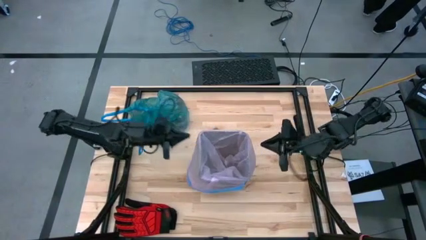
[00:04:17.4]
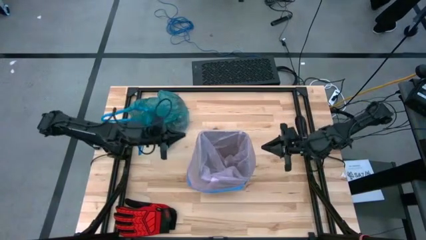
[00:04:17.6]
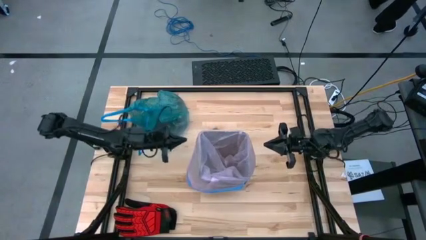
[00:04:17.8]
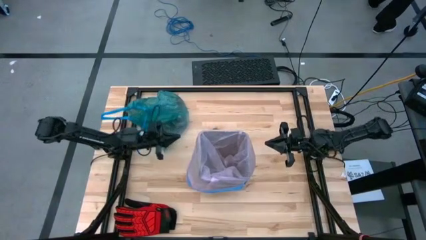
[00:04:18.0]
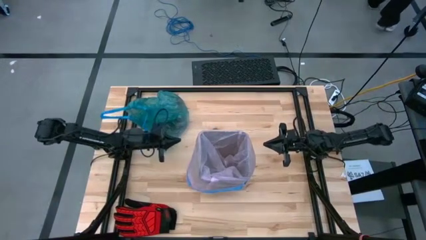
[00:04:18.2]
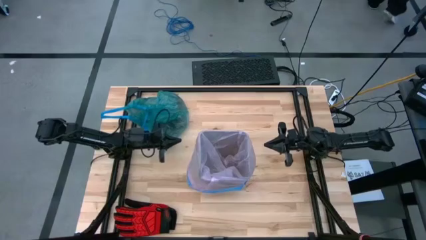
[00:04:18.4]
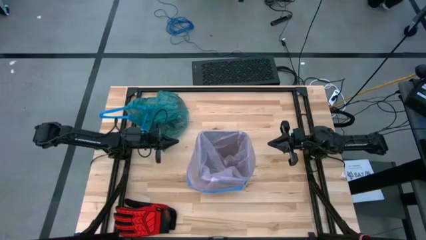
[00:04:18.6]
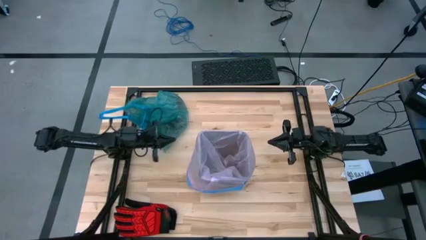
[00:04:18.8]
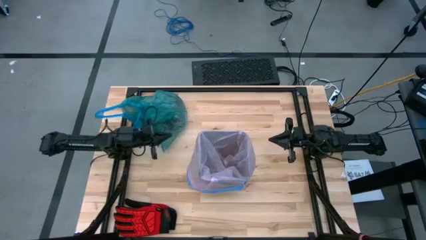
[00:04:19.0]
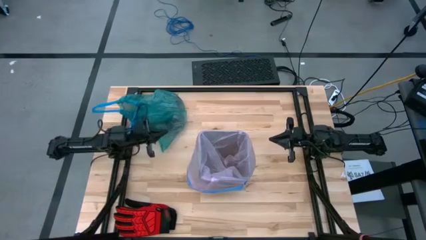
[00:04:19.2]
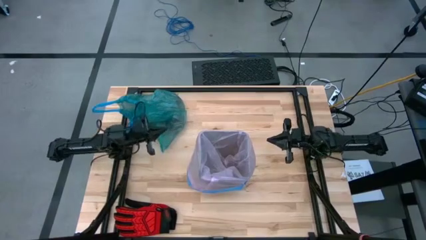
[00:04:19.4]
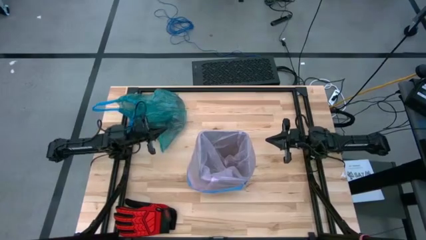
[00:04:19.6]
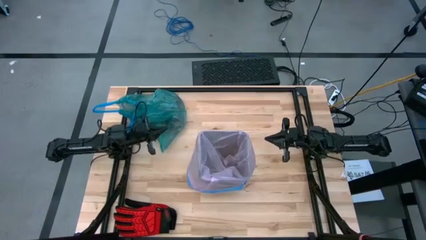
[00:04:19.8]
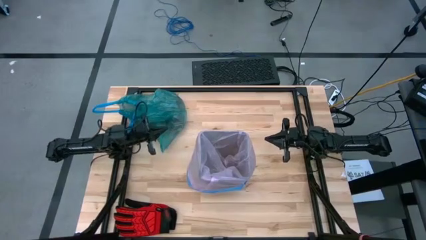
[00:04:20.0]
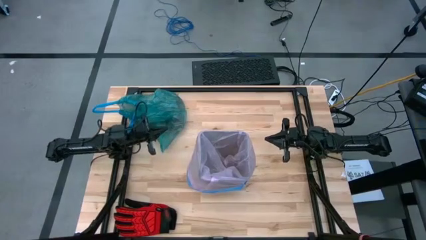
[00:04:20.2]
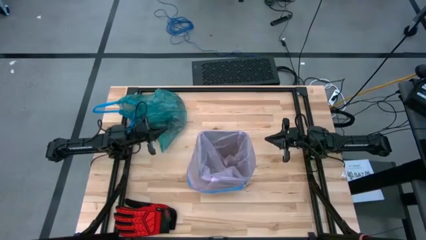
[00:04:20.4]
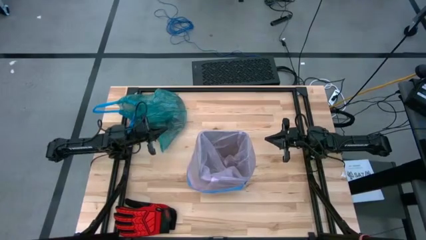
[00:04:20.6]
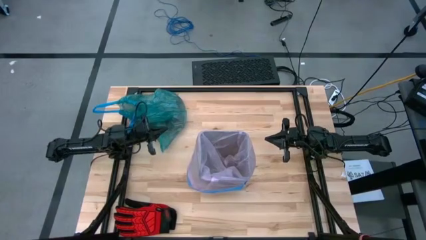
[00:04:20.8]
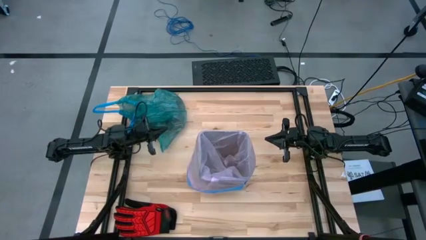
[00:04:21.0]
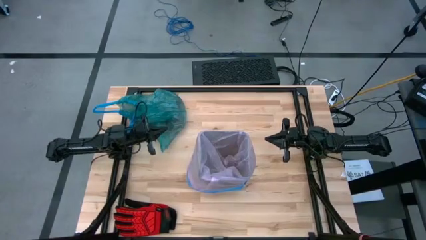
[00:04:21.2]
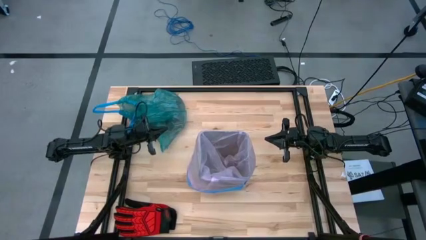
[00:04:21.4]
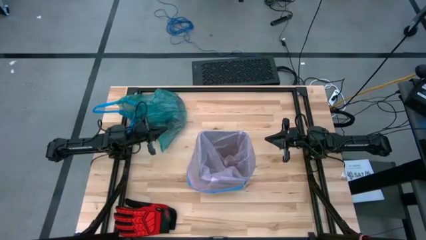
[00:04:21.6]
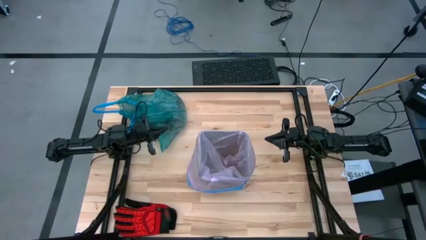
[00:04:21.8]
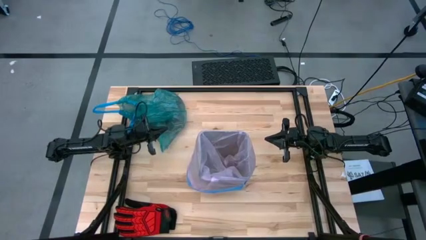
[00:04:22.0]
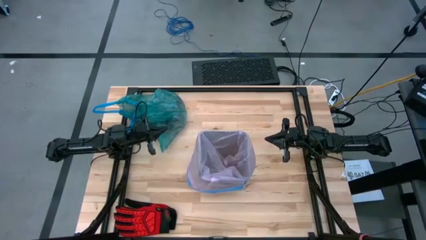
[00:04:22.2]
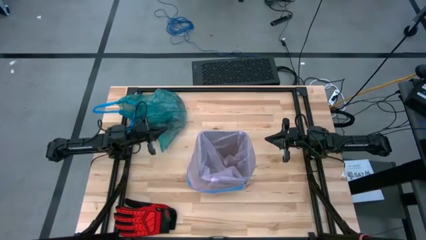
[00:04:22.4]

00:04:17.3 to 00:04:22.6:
Task: place trash/remove bag and relplace
Return to Home Position

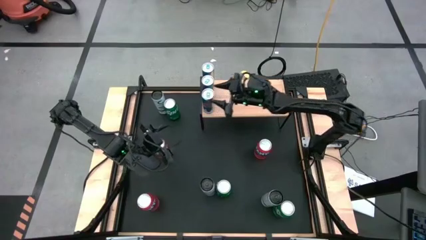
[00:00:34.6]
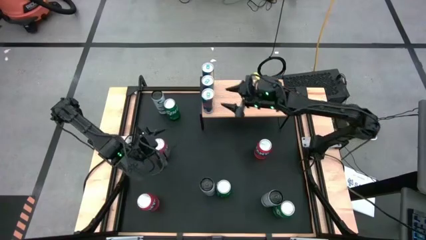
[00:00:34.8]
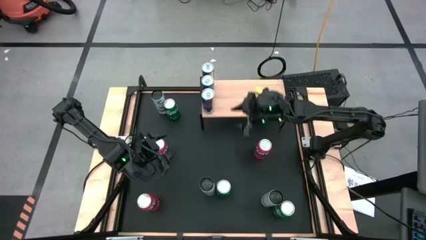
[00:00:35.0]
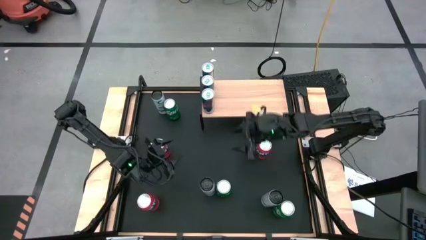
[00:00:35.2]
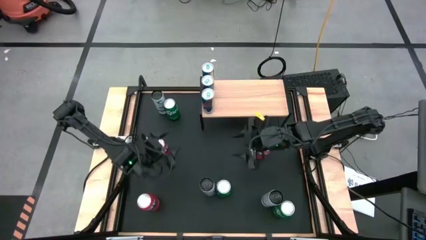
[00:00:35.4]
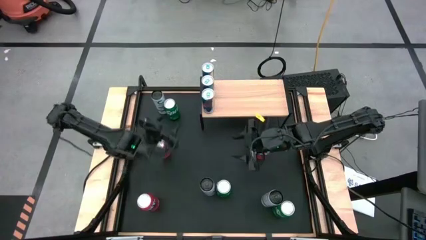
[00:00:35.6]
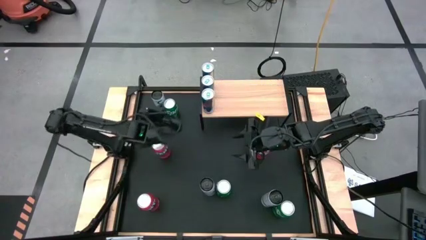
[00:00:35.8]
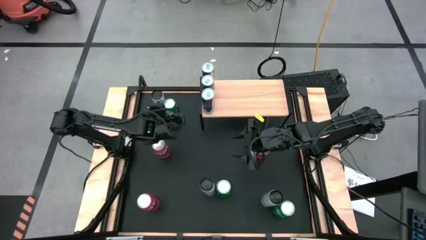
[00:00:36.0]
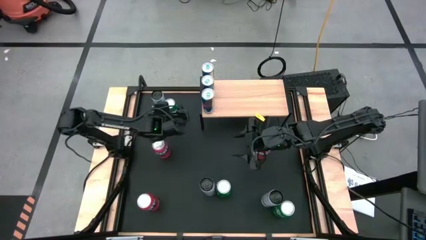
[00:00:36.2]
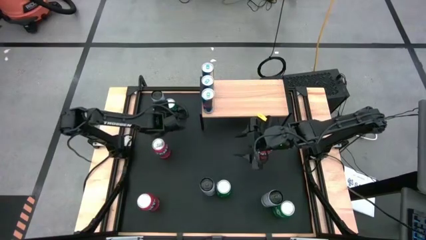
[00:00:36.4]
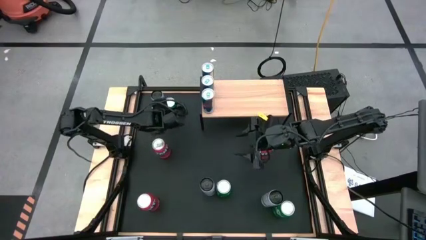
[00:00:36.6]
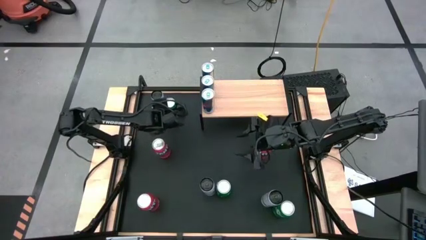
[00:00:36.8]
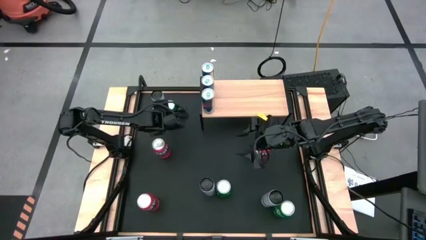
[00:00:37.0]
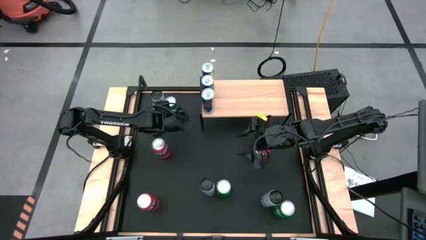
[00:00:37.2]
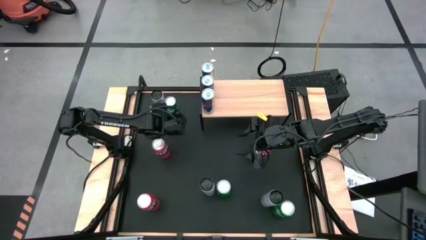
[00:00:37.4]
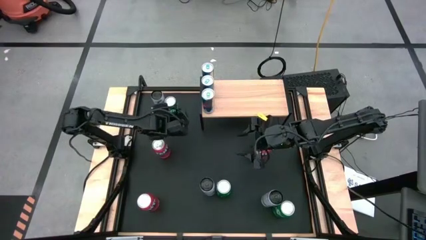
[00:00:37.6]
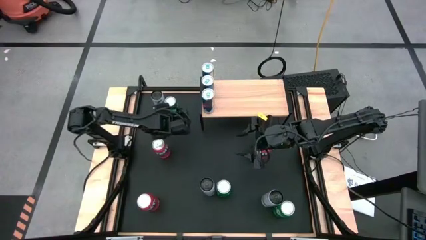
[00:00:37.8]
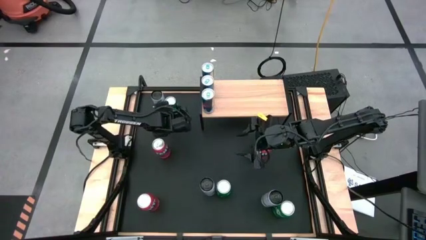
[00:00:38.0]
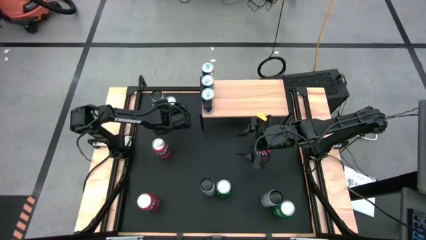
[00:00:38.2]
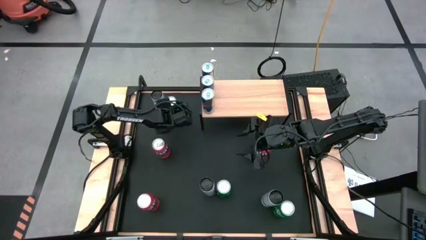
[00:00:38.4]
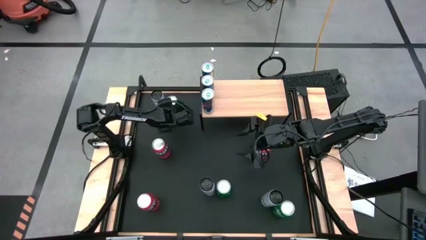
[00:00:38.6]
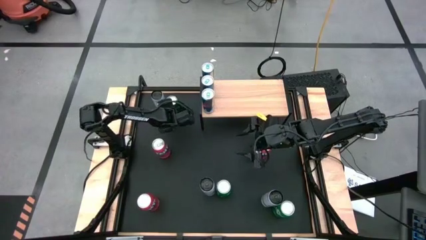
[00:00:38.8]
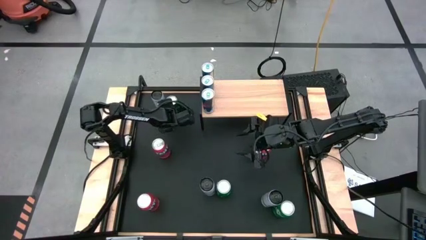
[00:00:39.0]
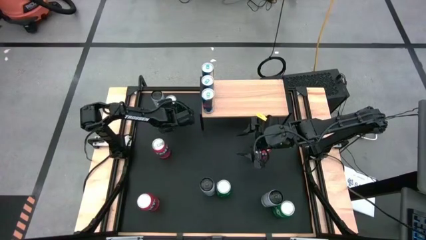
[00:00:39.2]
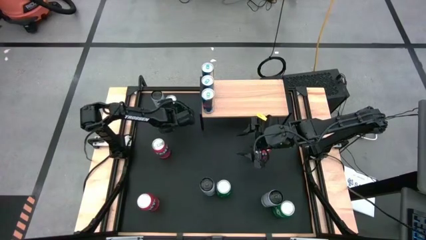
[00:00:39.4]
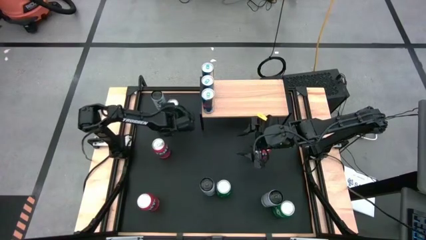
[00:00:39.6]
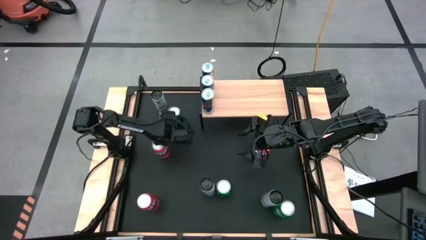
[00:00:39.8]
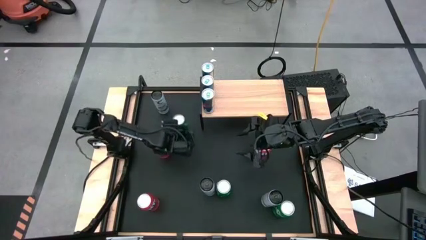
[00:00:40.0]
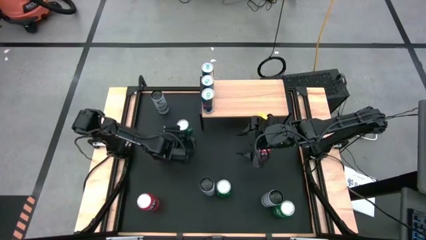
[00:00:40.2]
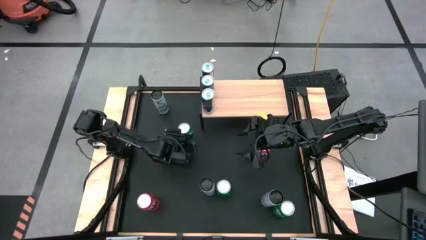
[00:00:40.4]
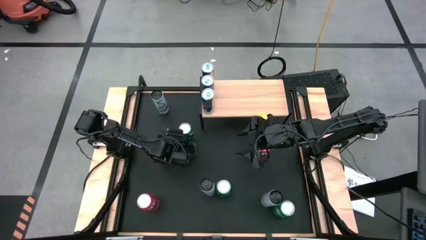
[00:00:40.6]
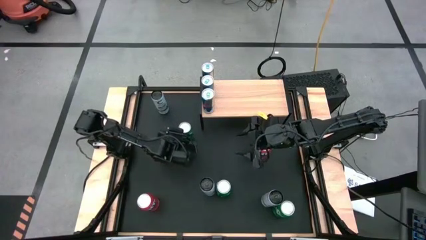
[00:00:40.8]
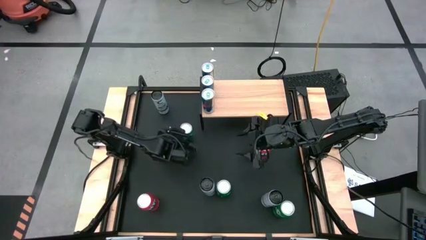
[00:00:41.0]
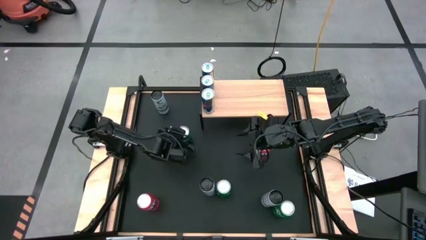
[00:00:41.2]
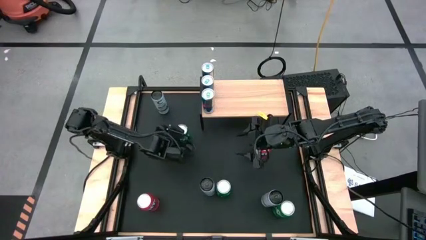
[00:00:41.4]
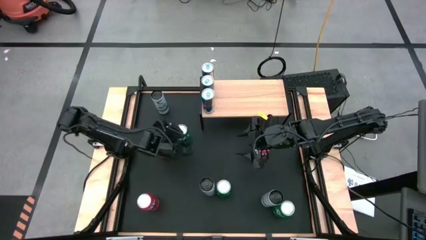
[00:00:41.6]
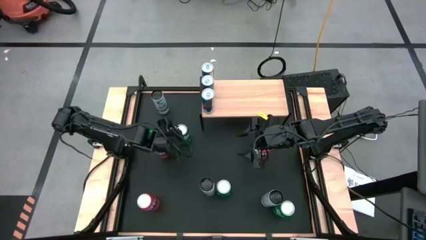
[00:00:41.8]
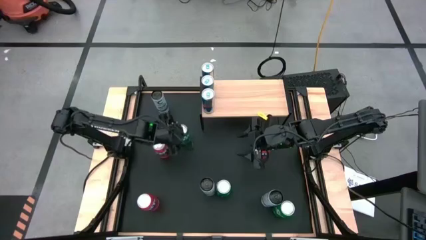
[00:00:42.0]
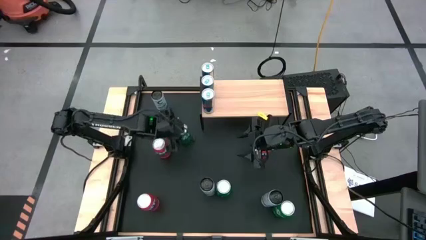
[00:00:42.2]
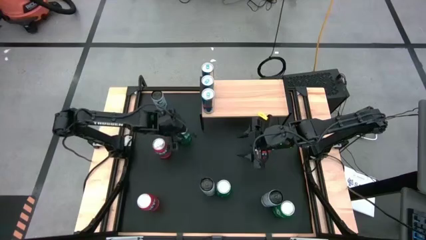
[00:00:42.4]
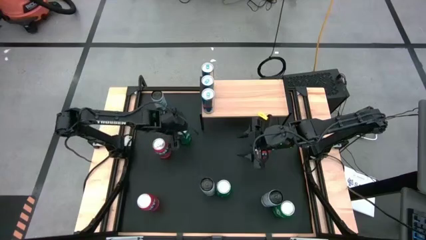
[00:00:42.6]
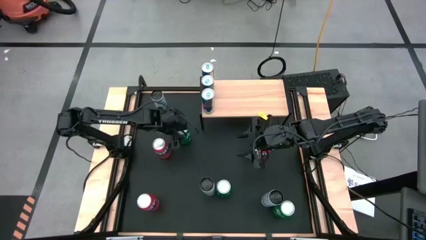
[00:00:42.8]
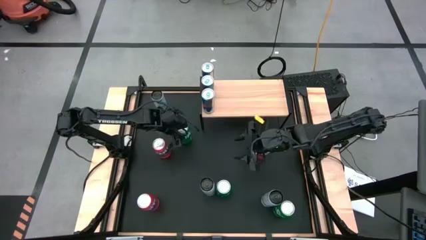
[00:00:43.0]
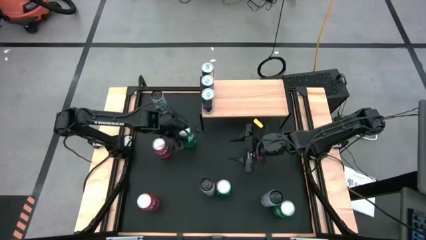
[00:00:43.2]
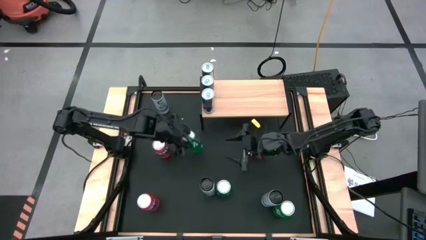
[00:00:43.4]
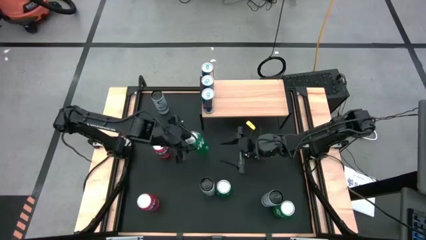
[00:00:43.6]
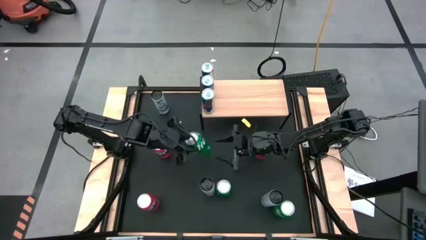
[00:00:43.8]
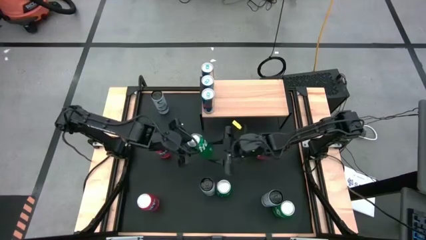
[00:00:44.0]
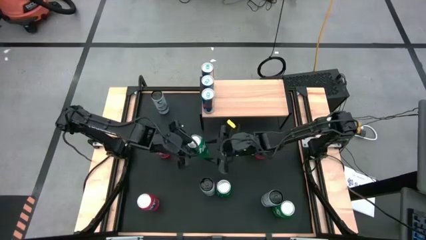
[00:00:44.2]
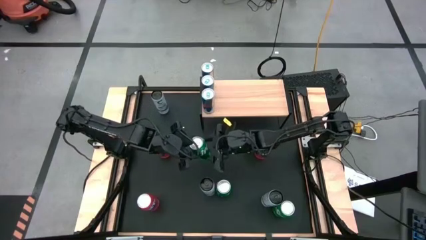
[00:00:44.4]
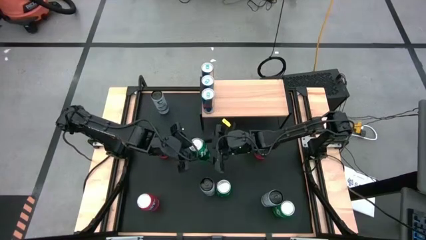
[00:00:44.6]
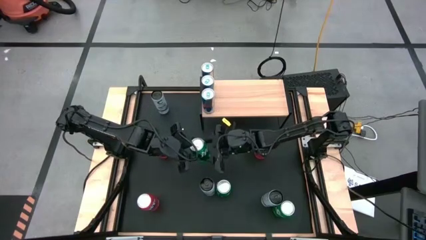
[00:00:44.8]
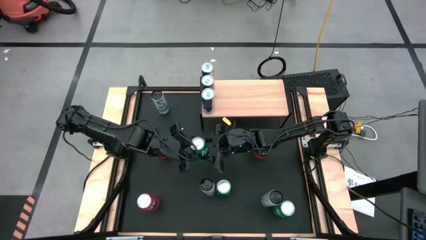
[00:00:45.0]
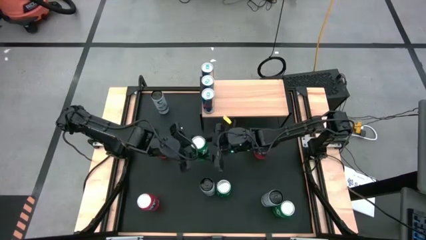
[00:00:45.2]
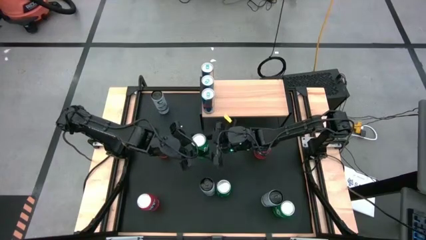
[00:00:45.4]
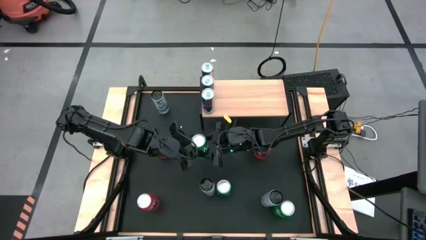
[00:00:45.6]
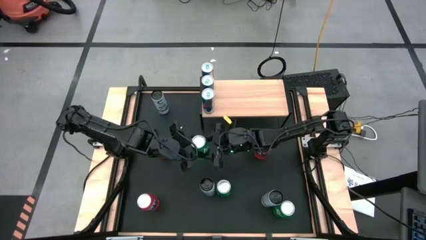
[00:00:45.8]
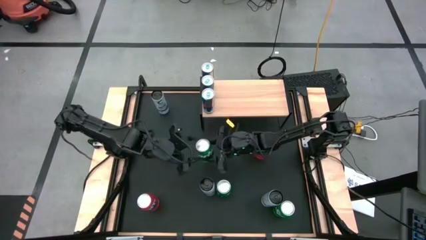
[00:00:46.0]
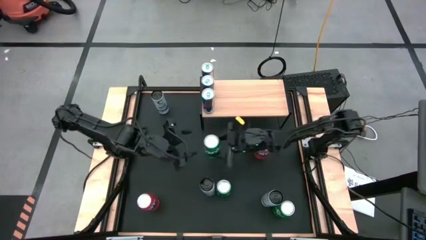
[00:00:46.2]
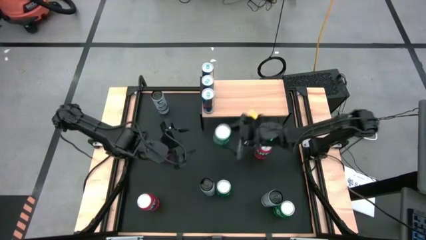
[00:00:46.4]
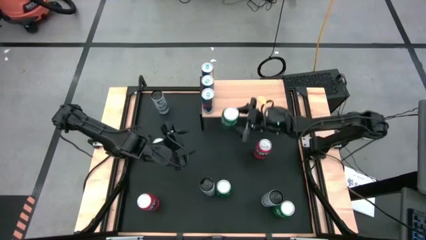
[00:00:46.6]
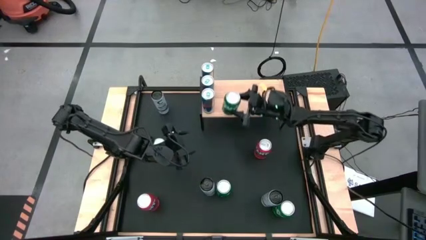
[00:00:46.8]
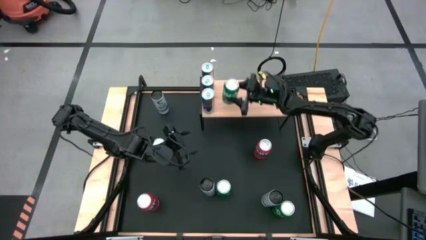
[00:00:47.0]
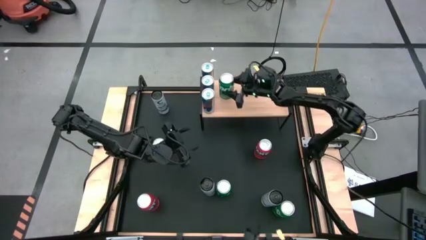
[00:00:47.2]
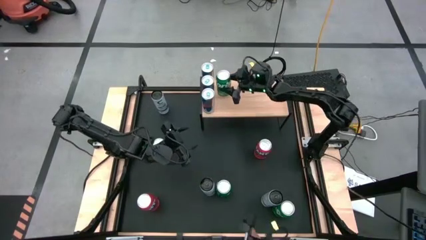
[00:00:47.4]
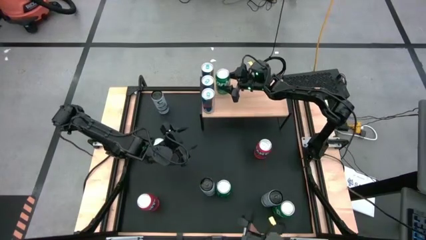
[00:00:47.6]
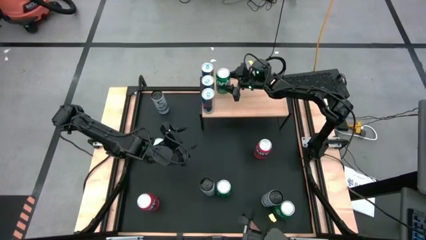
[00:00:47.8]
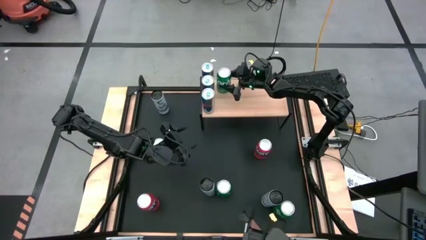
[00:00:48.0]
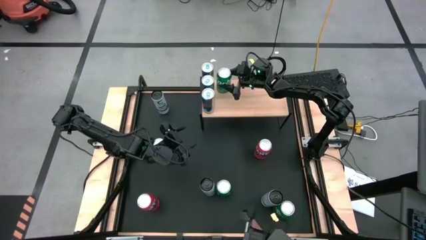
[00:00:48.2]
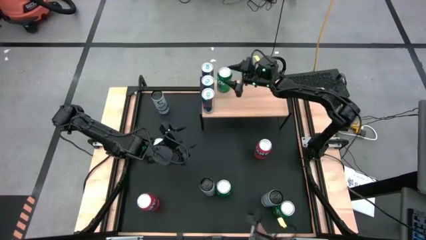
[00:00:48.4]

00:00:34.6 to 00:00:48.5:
Task: Place canned beverage on shelf
Put the top right green soda can on the shelf
